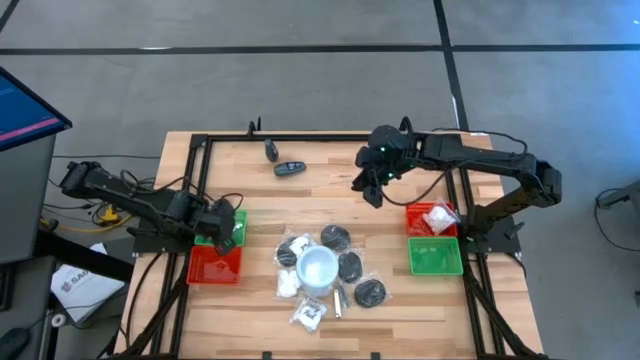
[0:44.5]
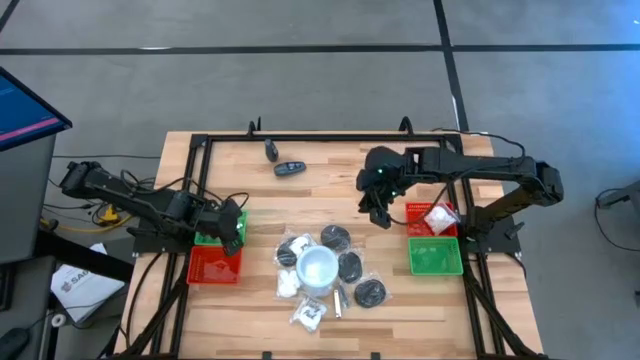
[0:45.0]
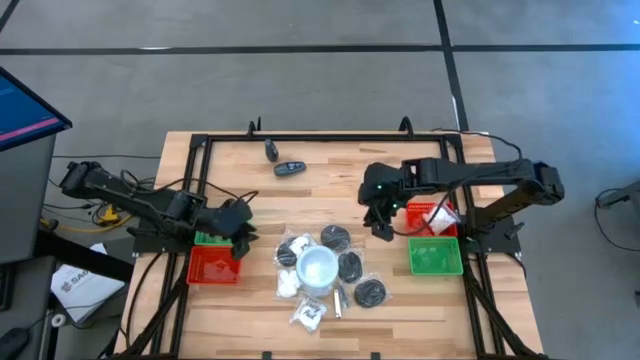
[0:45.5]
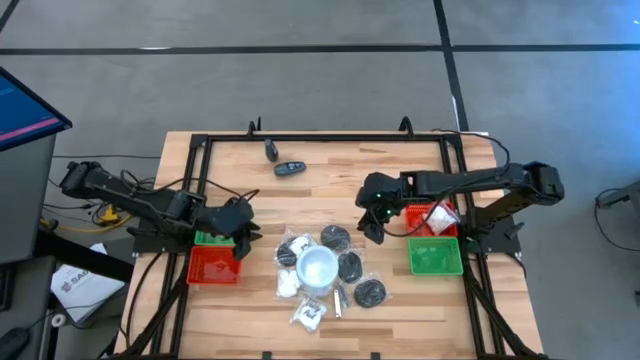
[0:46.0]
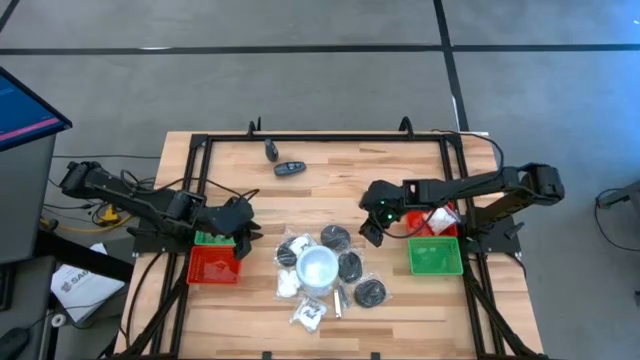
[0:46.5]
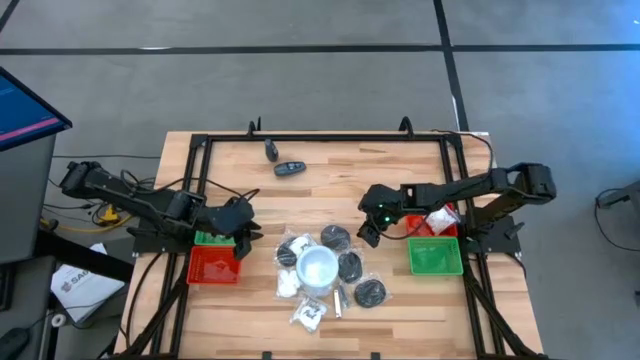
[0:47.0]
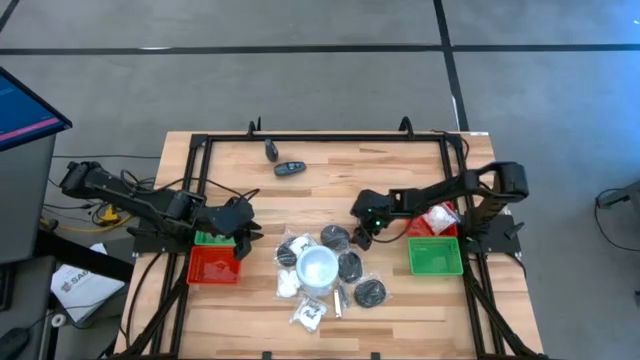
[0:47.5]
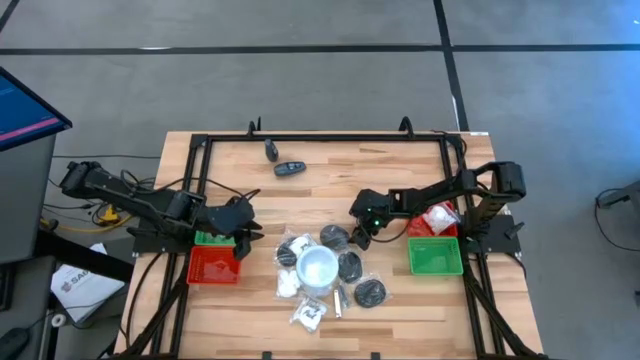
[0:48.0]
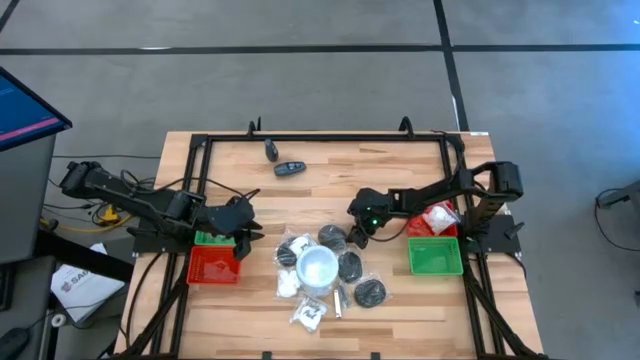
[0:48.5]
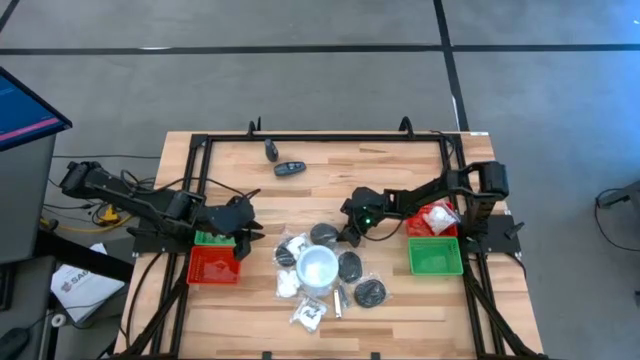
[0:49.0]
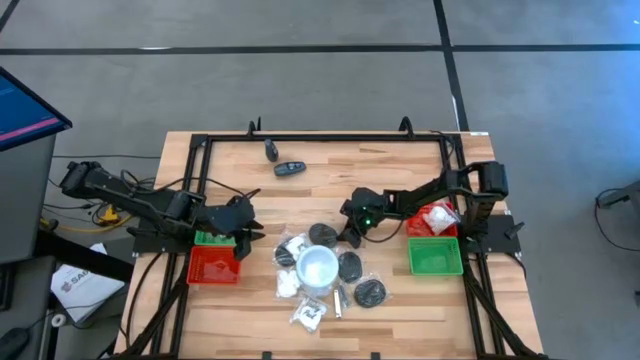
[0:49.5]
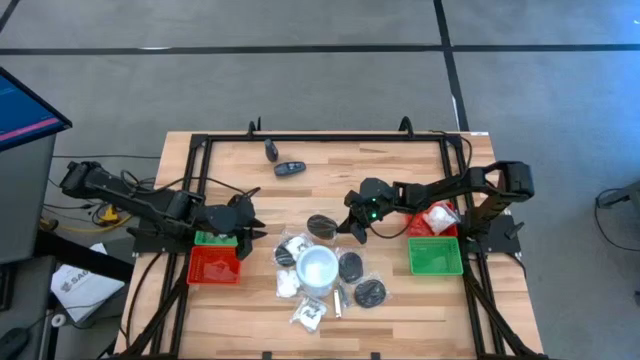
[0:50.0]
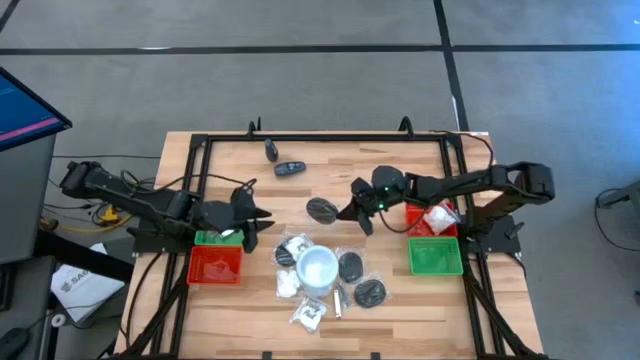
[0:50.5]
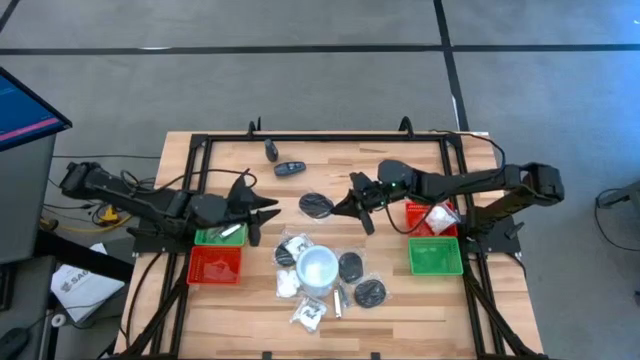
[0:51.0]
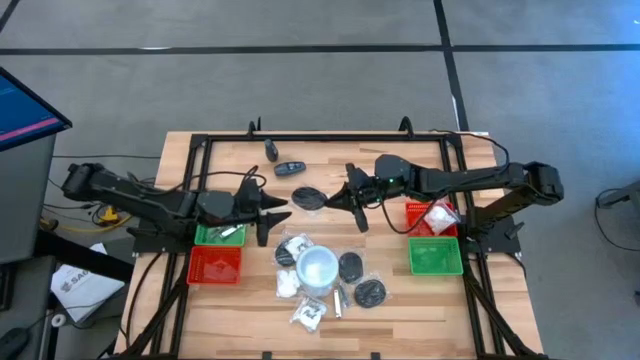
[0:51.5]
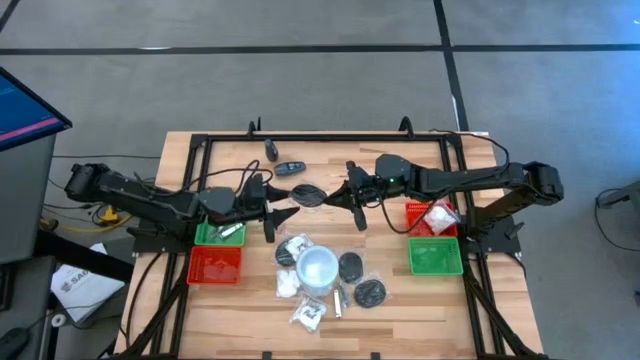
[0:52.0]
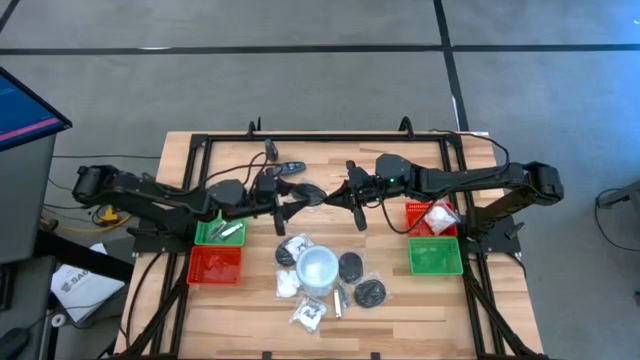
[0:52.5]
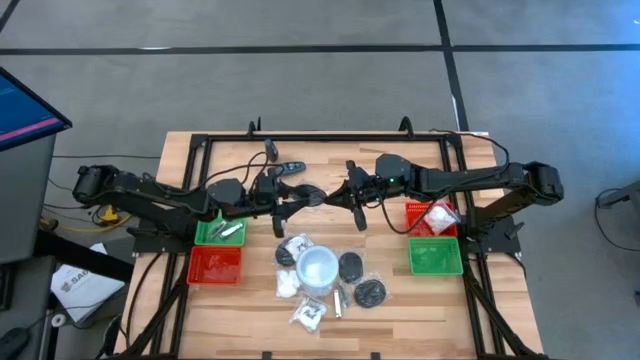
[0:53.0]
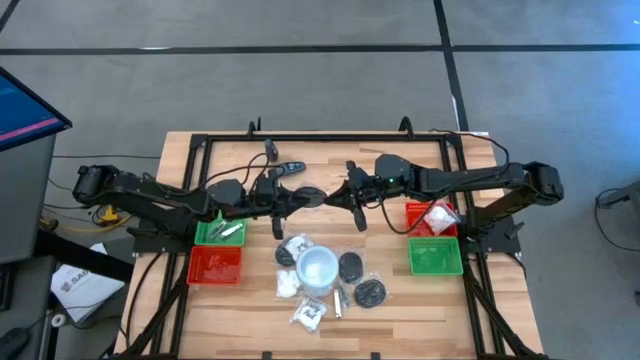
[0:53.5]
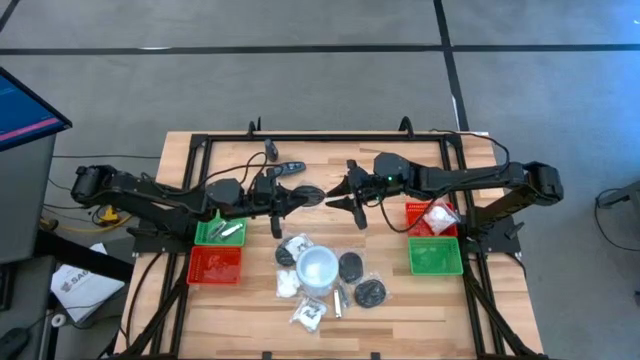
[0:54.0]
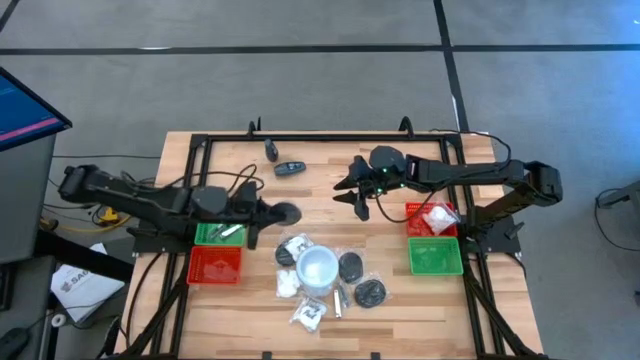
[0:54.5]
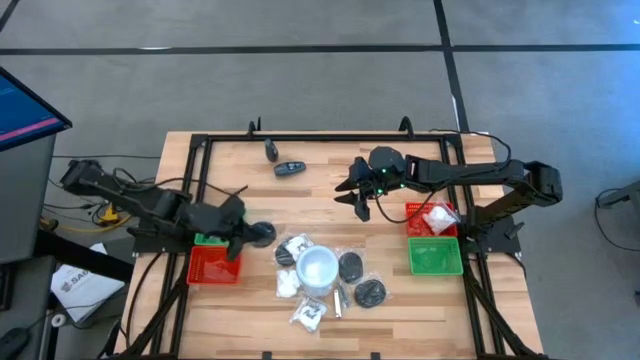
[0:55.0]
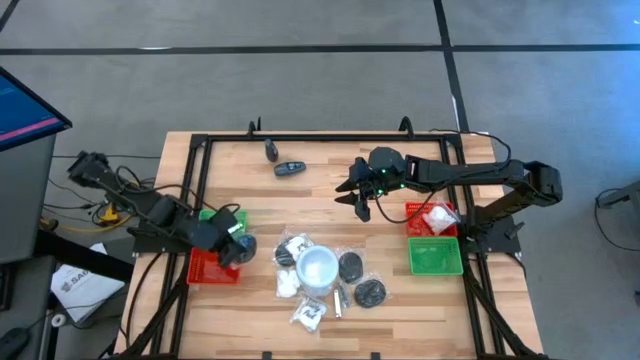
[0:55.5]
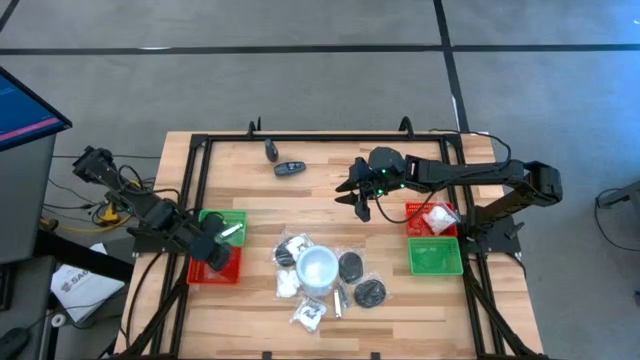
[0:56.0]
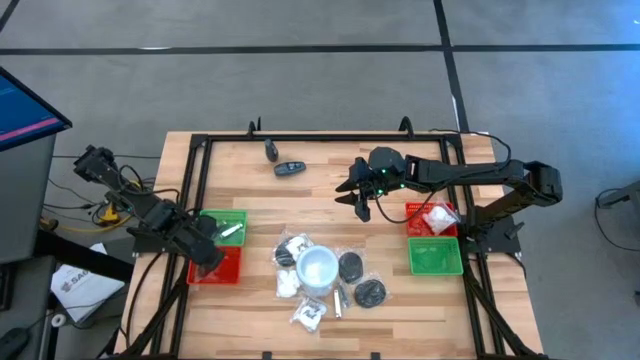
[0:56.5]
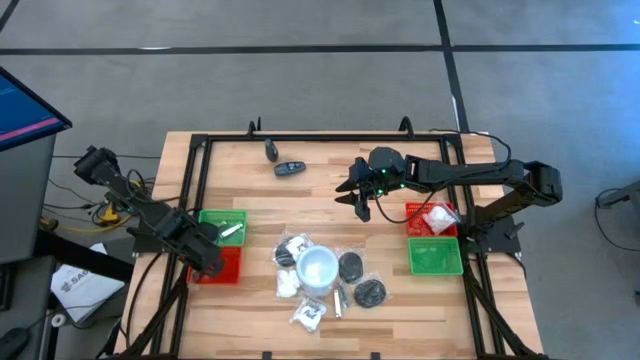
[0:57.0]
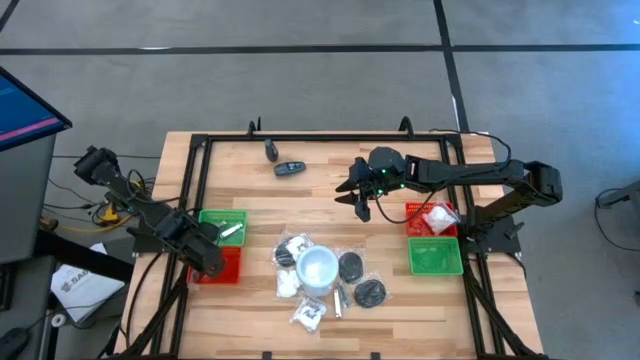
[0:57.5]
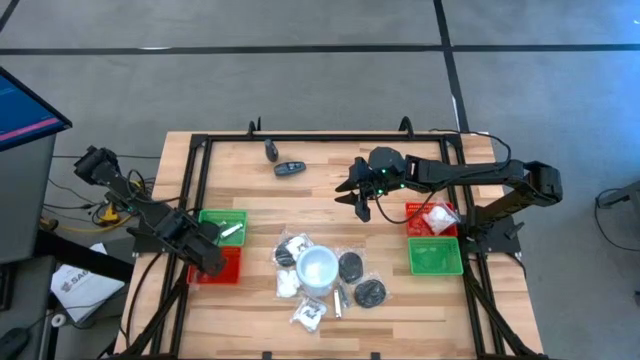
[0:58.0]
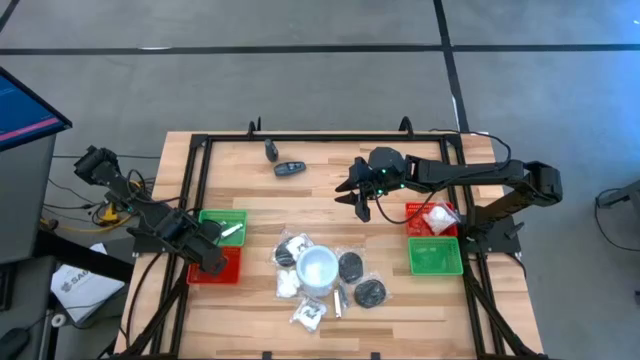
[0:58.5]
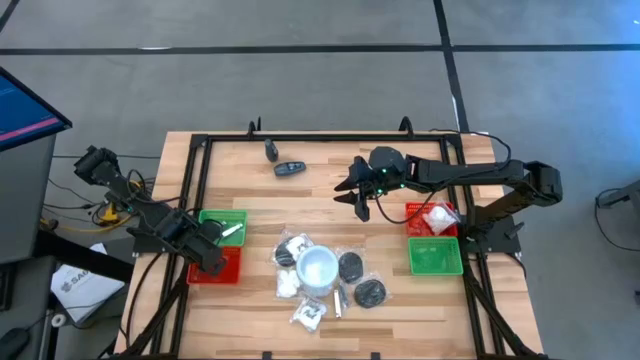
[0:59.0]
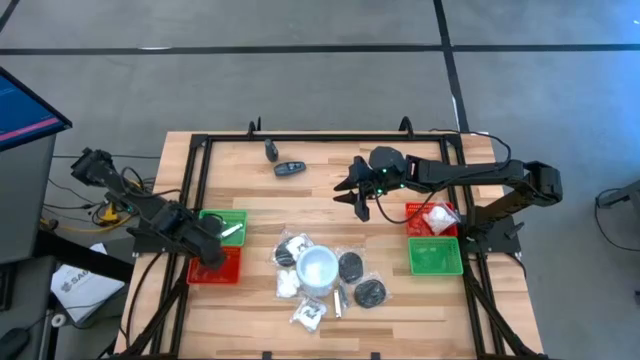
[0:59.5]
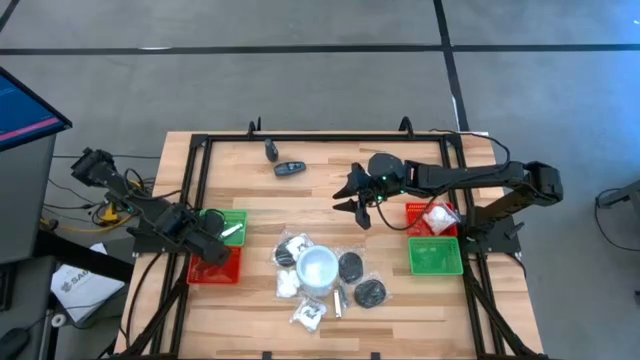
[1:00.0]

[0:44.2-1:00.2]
Task: Pick & Place Travel size toiletries
Put the black hairbrush into the left red bin

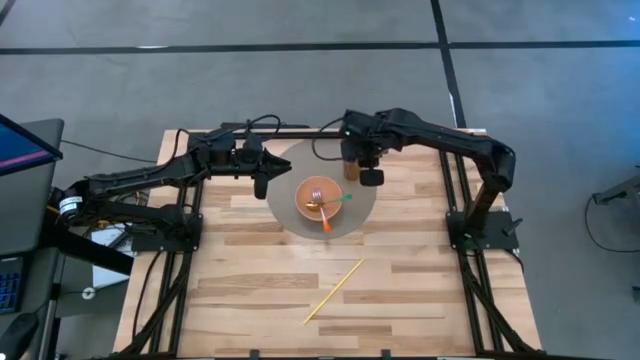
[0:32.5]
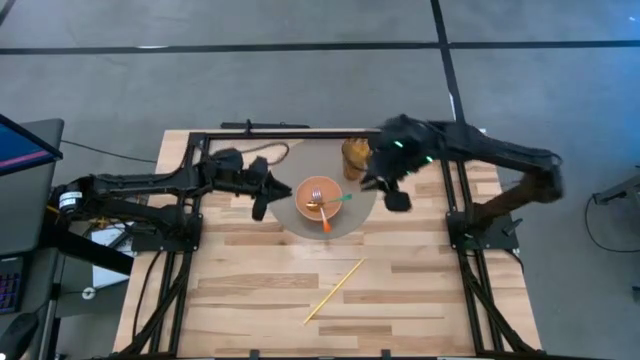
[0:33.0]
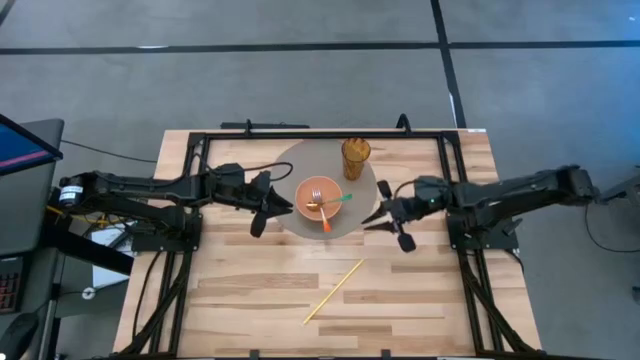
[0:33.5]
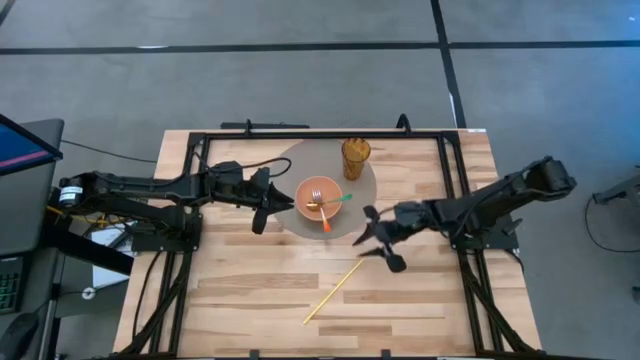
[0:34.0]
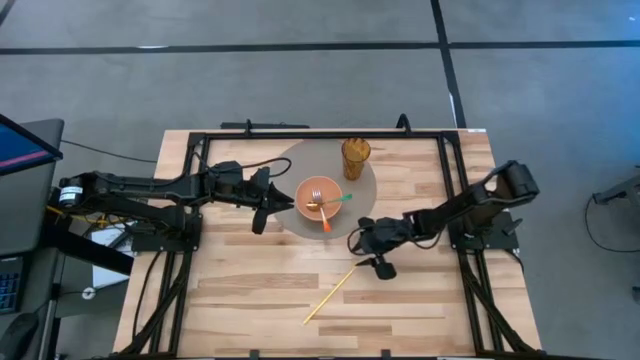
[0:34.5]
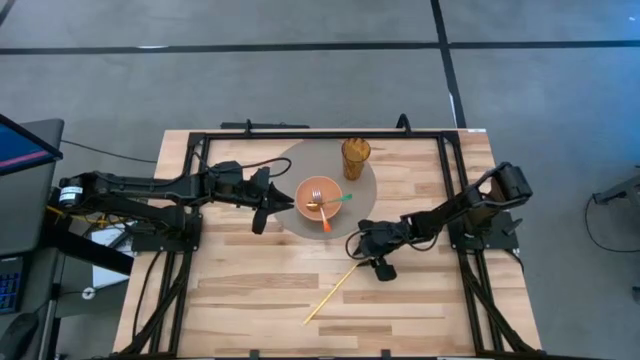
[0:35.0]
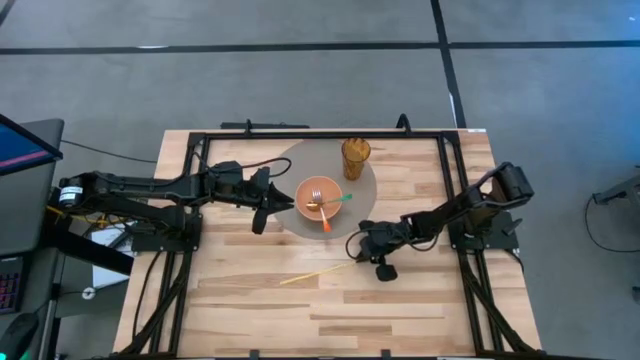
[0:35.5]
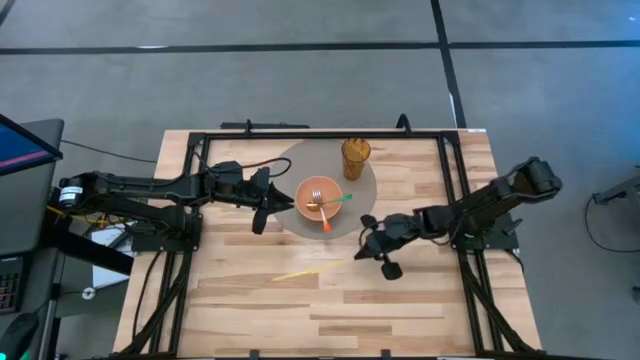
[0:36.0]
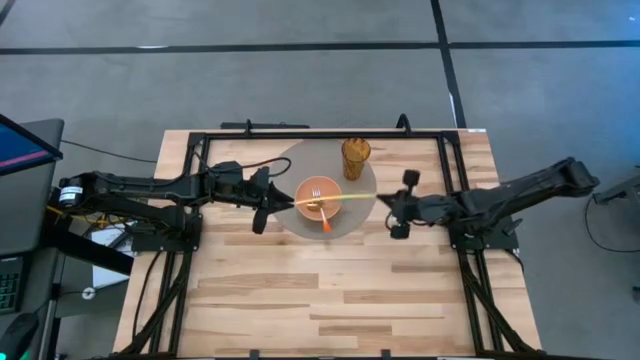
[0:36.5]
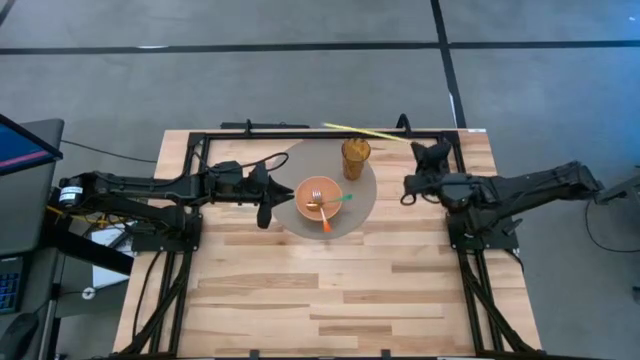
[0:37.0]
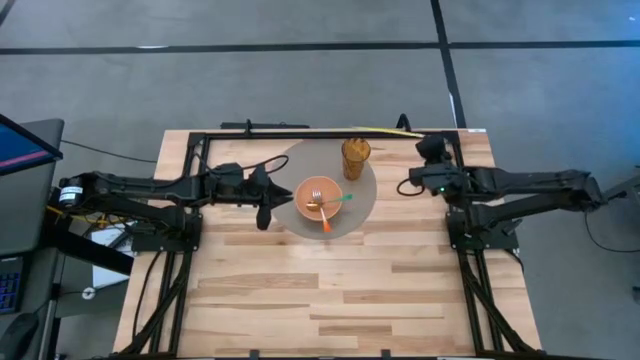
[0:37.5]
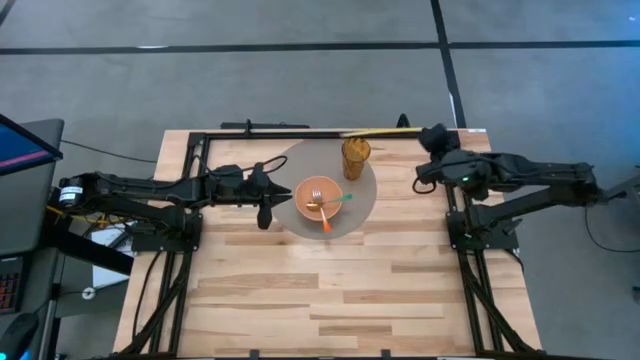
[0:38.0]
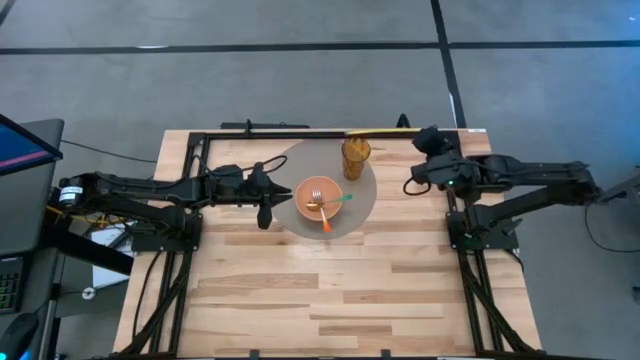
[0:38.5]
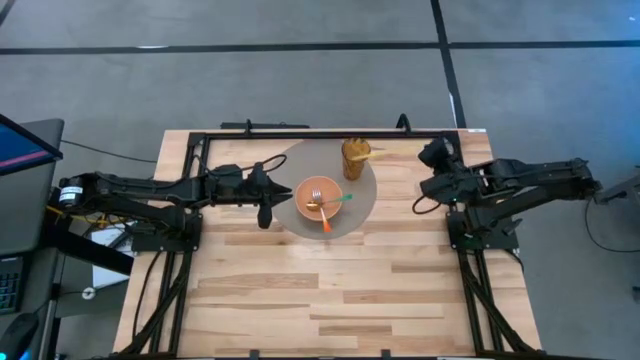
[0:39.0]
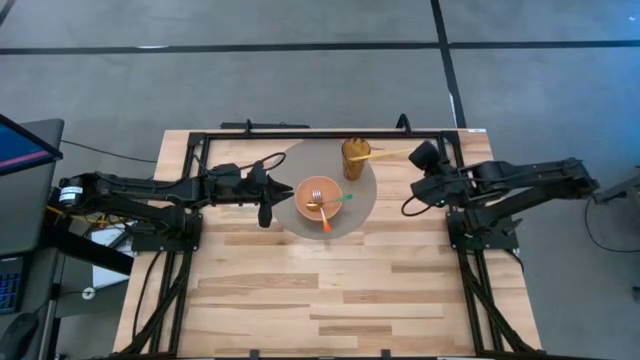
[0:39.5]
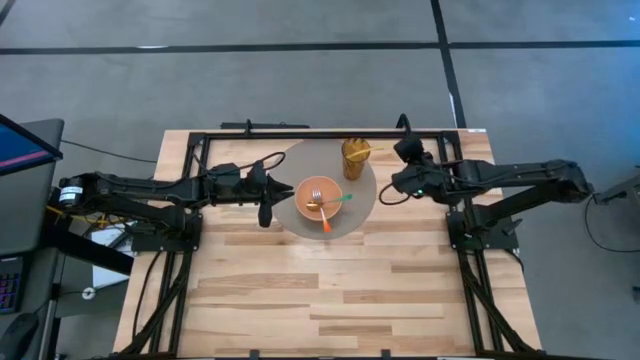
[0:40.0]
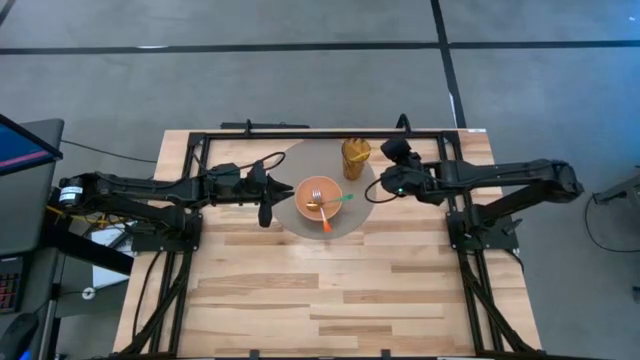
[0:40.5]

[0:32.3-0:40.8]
Task: Pick & Place Utensil
Put the yellow straw into the brown cup on the gray table placemat
